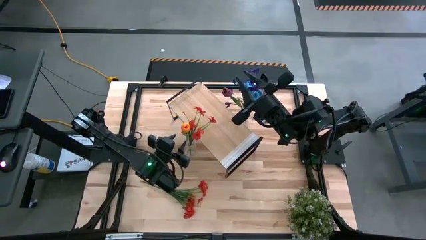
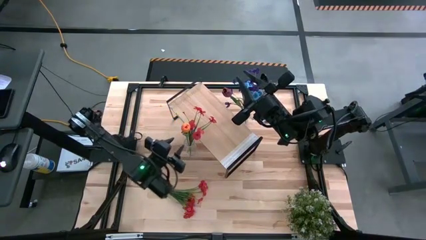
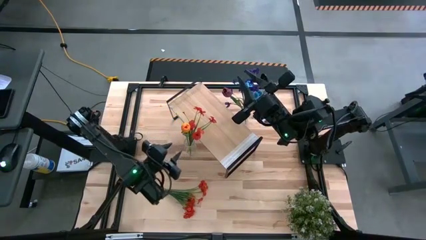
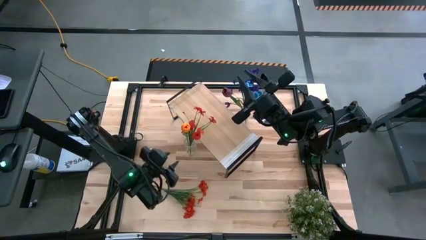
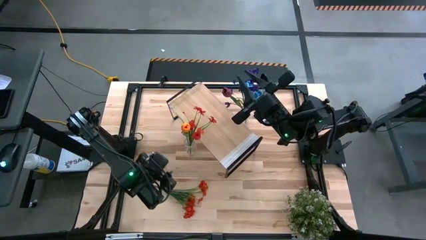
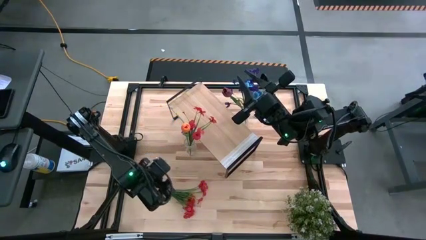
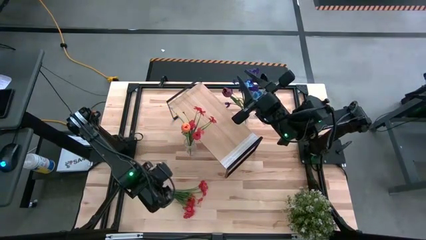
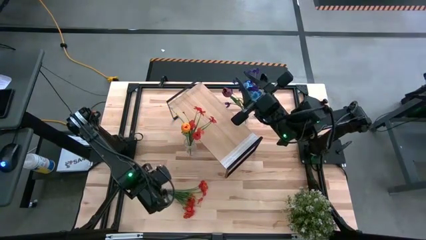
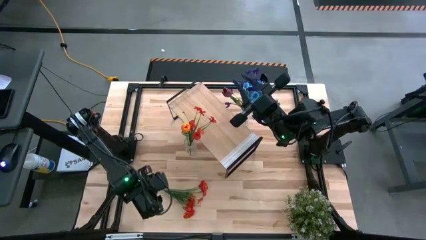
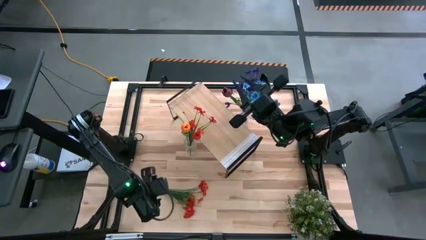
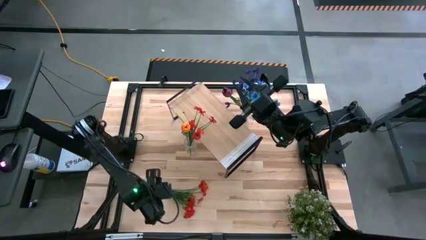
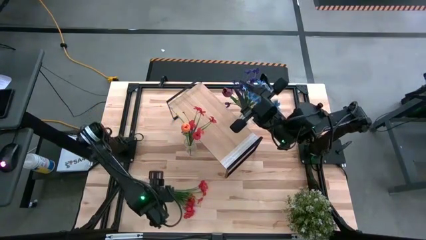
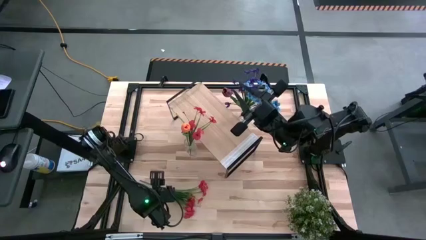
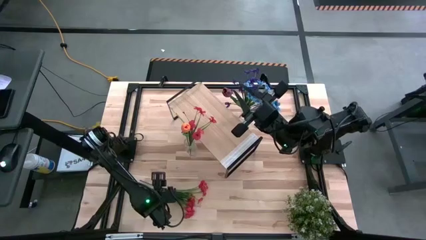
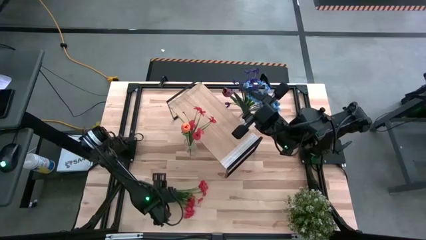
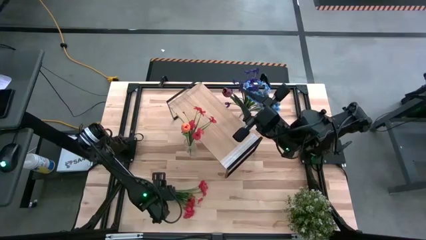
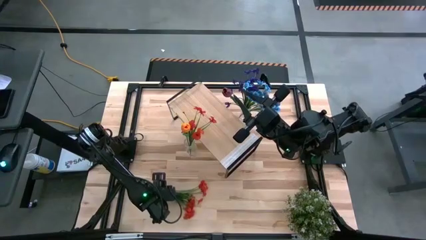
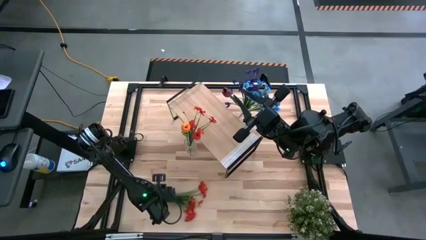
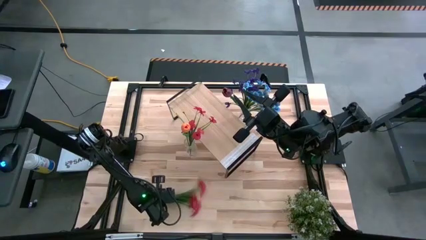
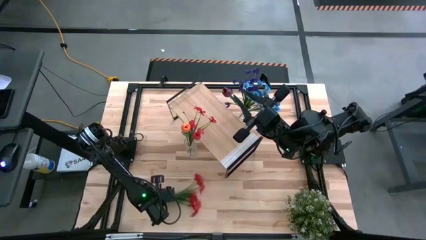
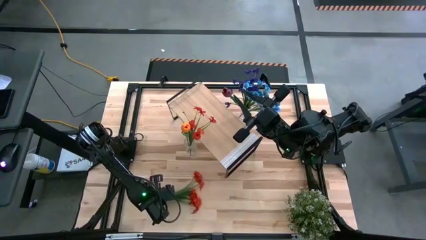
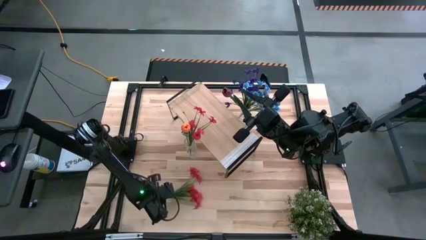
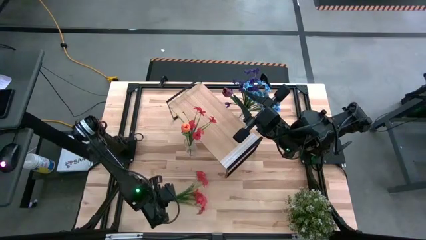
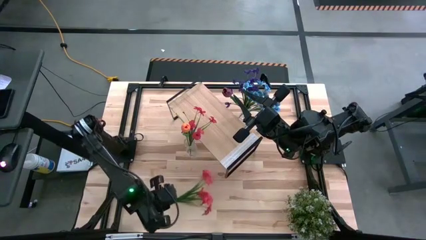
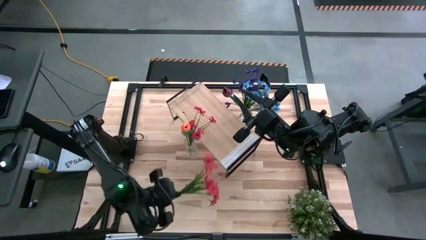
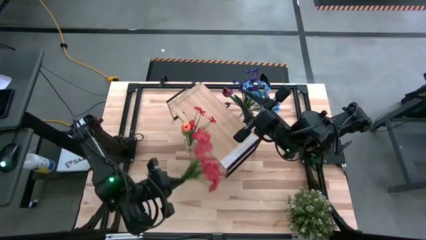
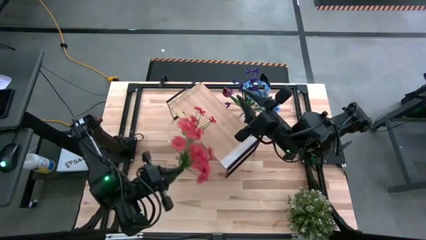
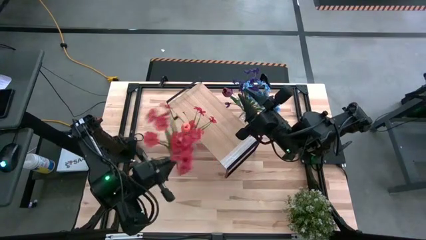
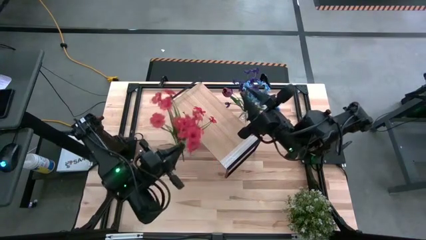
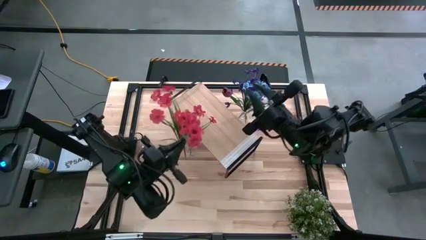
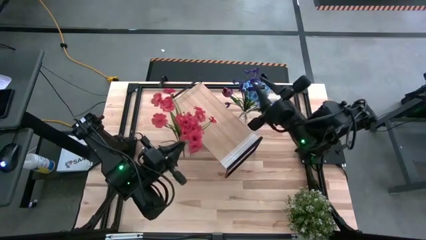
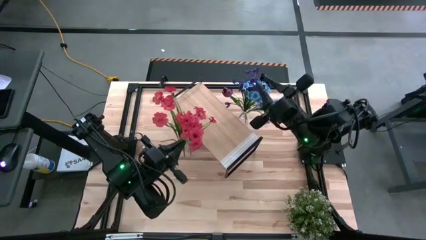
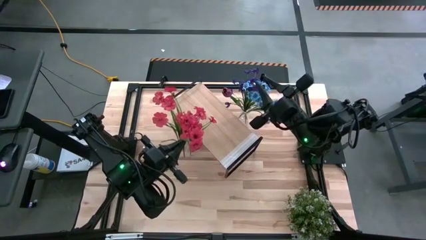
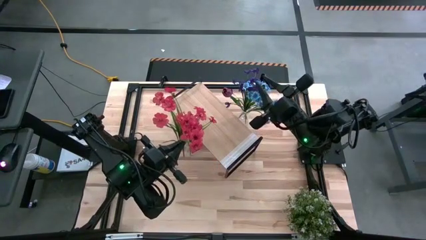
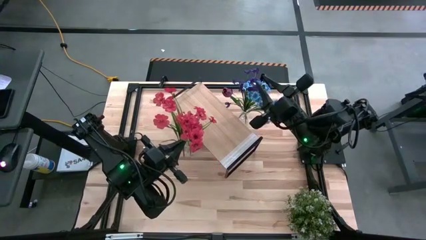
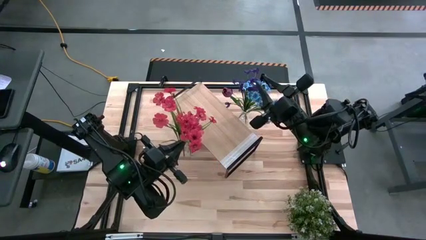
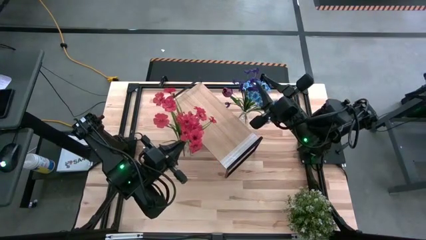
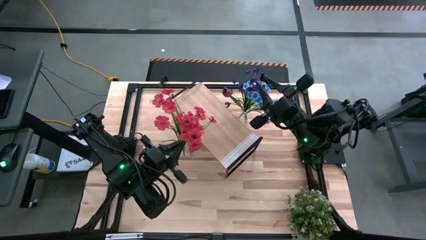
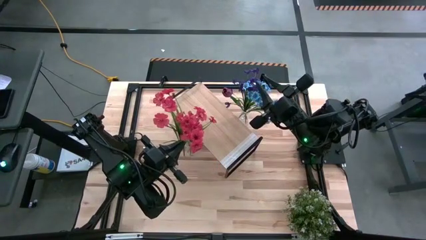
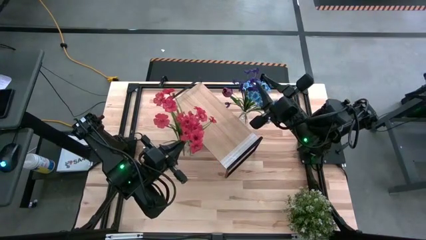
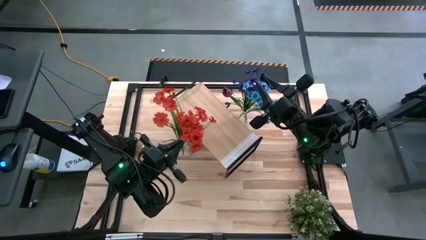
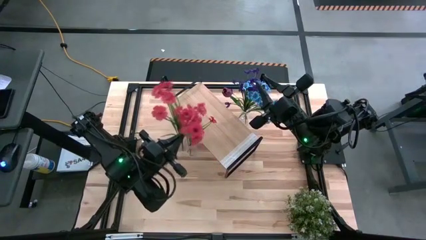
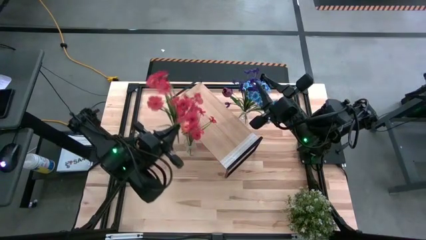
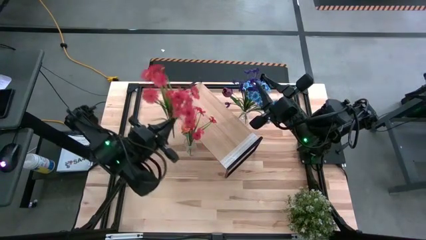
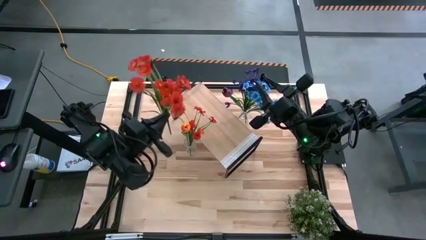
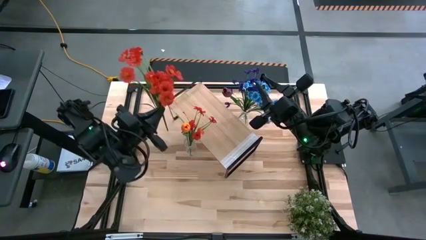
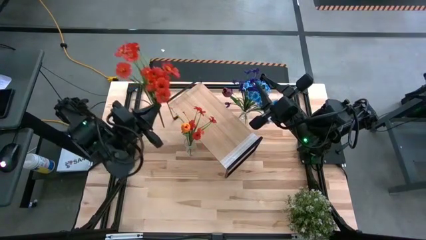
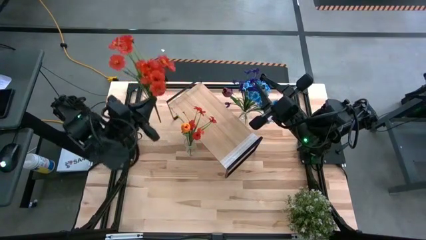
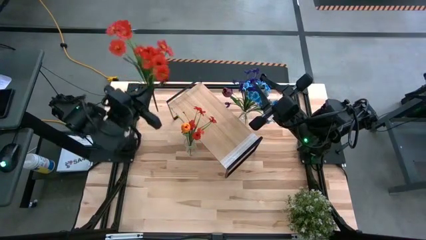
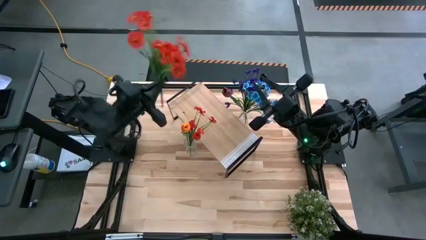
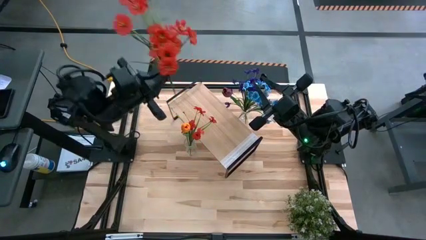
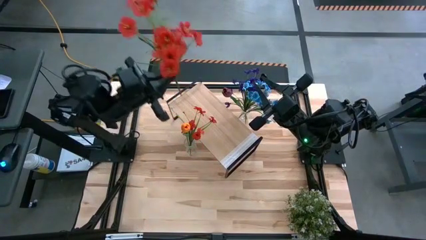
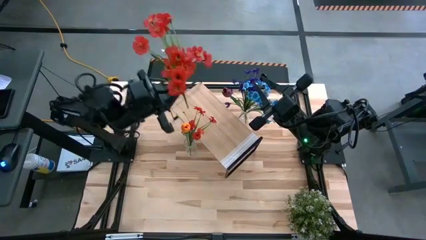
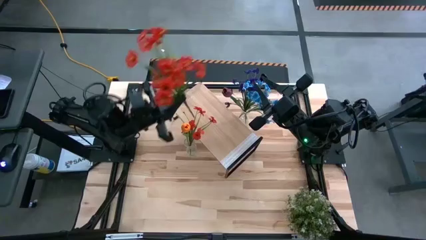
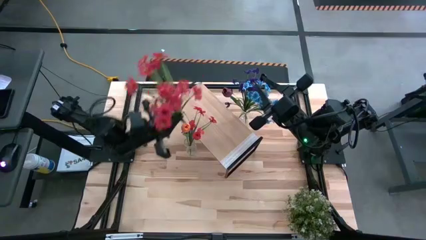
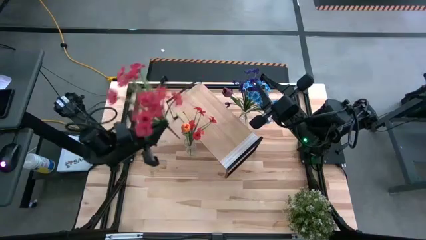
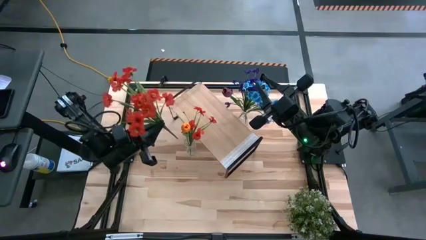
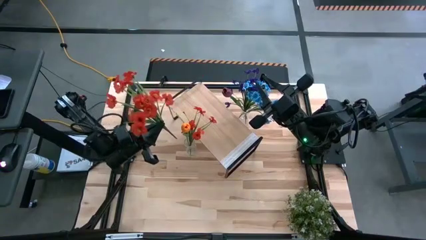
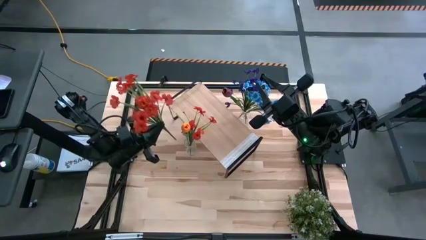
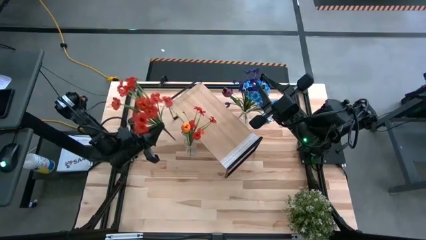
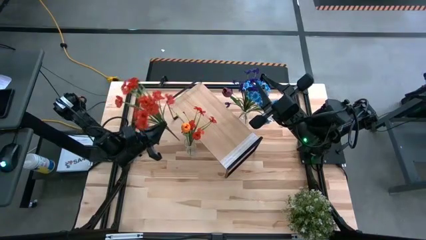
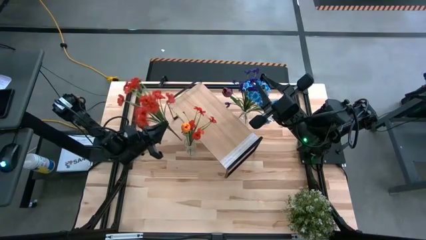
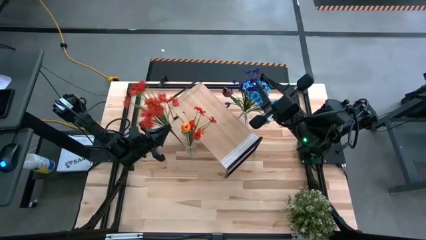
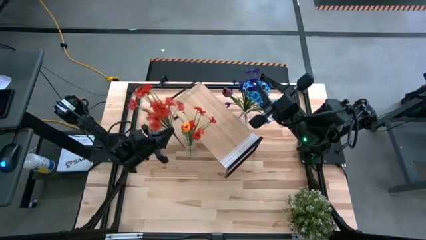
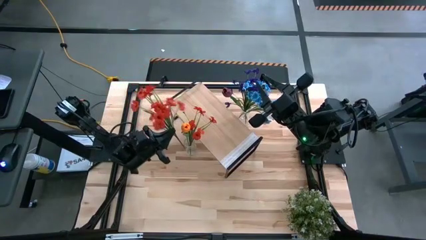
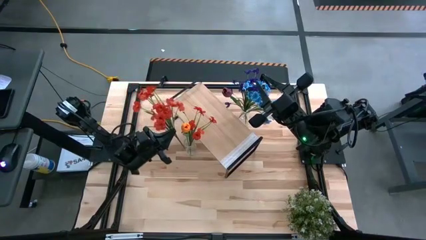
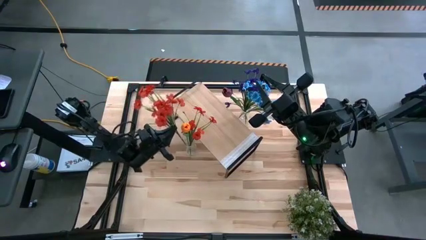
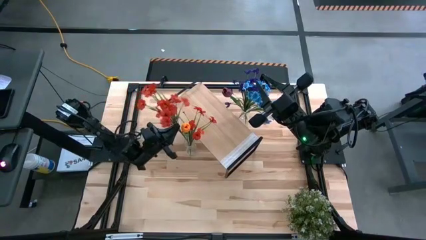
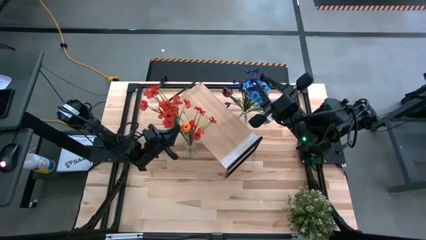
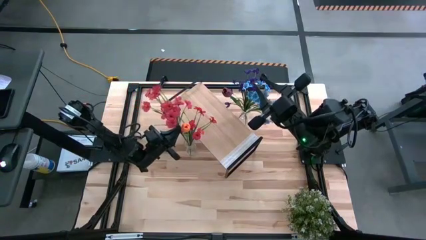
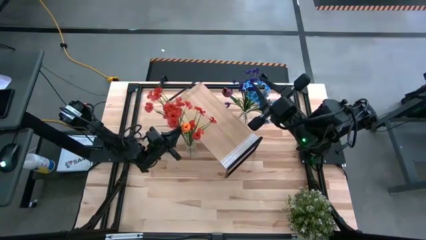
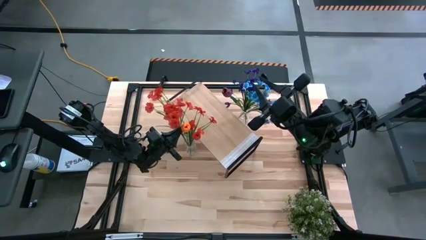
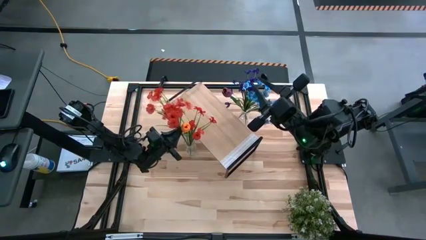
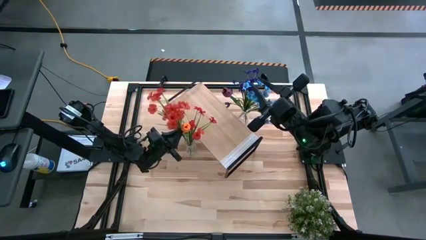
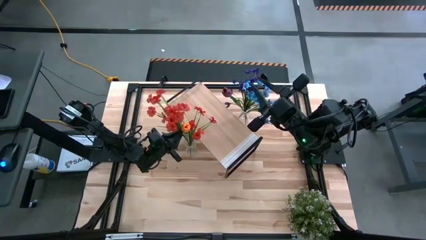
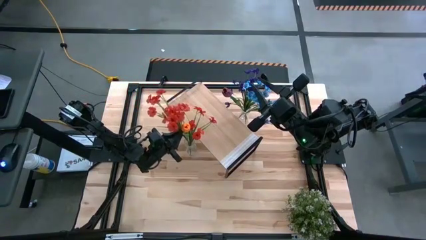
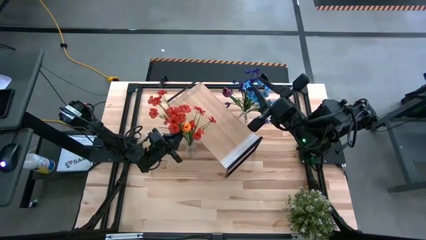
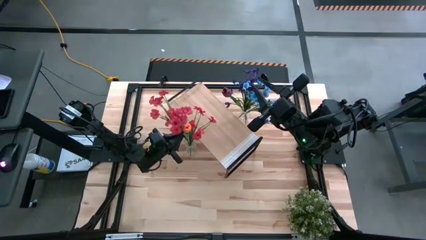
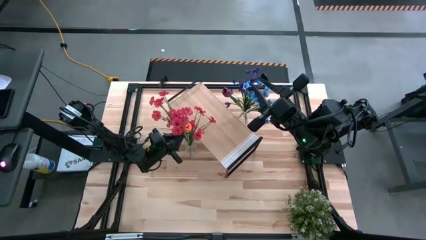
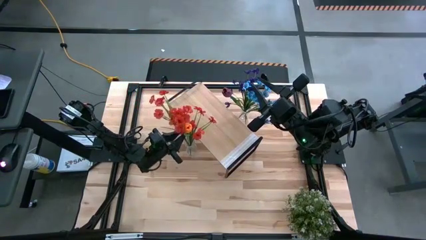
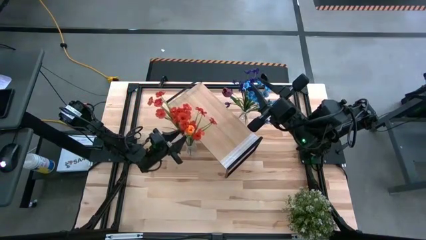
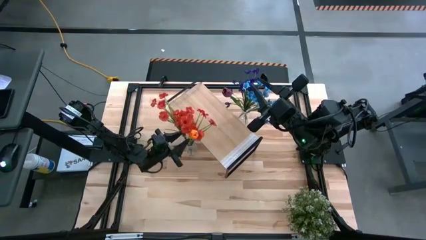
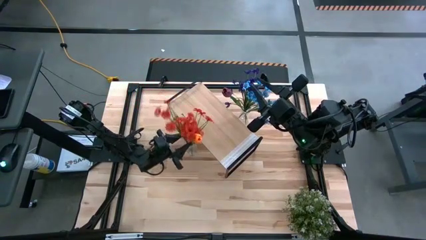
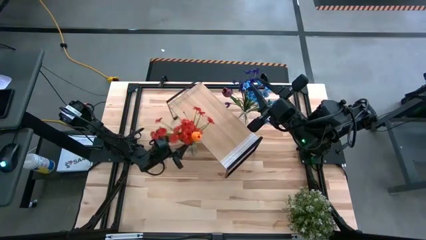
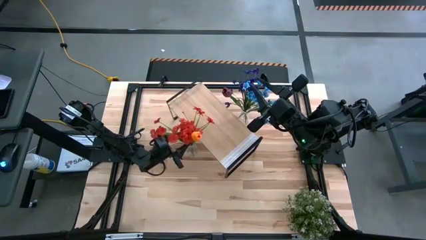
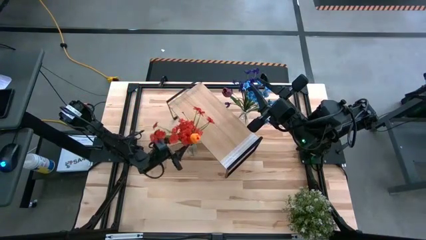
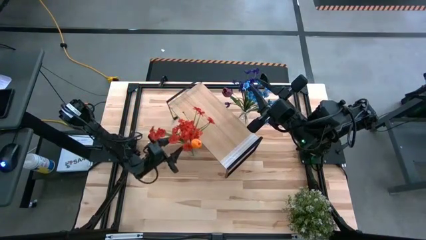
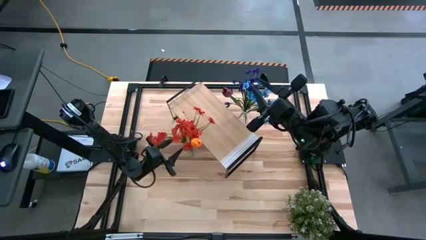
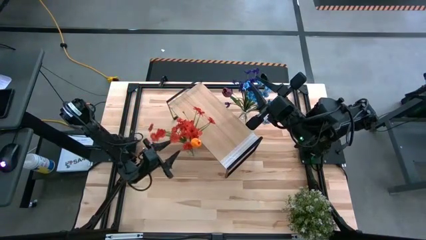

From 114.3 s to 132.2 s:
Task: Pick and place flowers into a vace then onto a shelf
Put the orange flowers into the bottom transparent vase
